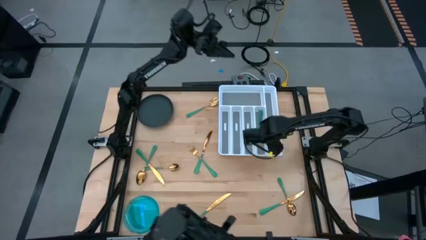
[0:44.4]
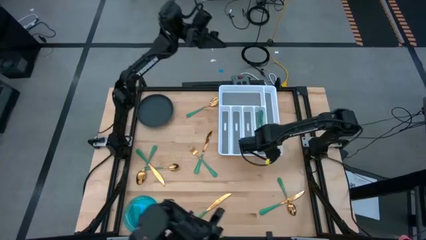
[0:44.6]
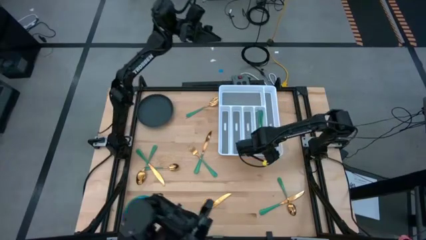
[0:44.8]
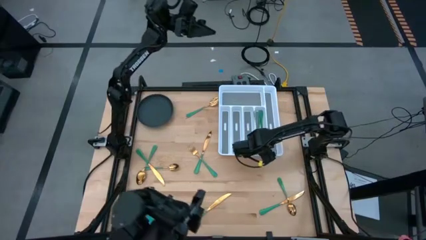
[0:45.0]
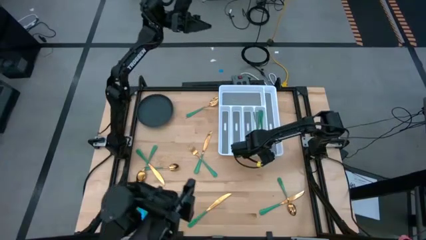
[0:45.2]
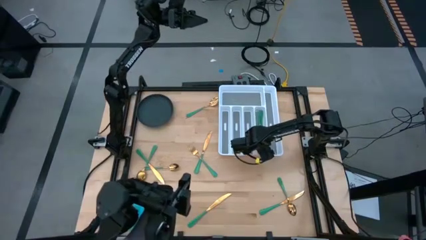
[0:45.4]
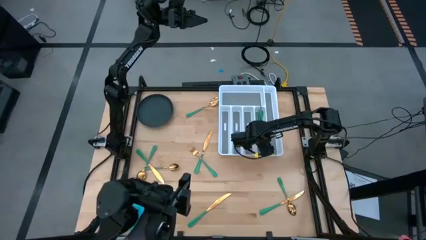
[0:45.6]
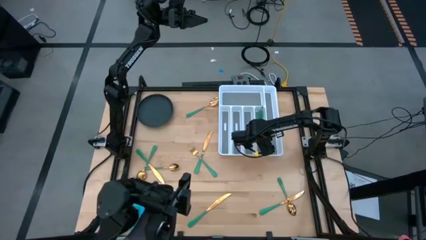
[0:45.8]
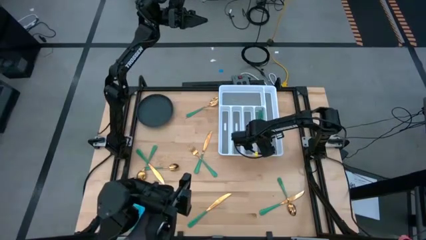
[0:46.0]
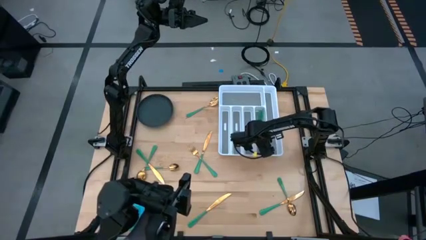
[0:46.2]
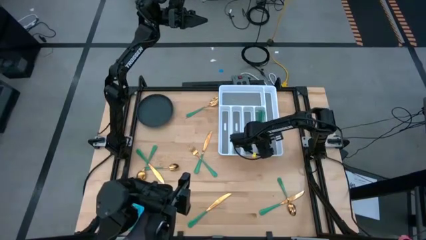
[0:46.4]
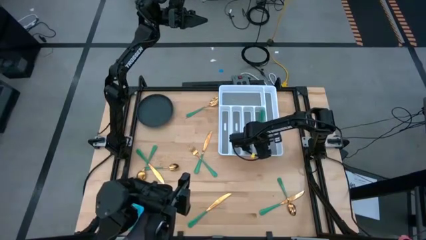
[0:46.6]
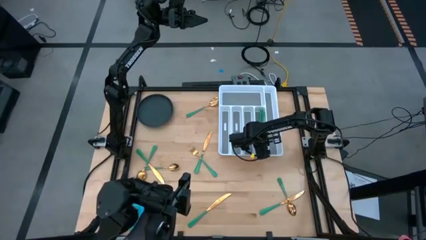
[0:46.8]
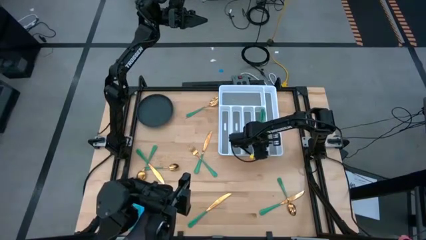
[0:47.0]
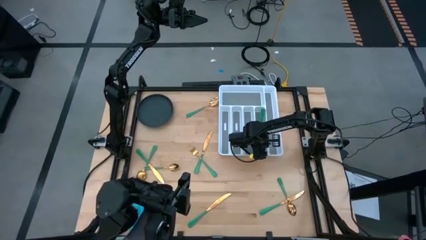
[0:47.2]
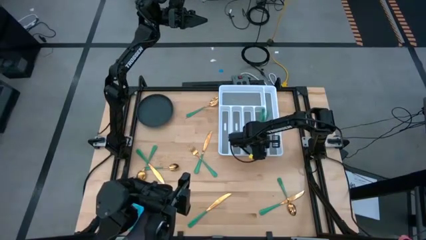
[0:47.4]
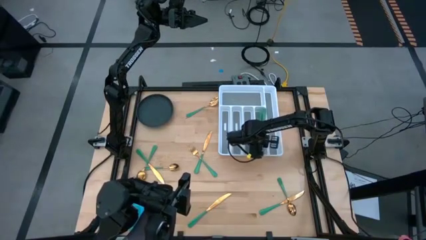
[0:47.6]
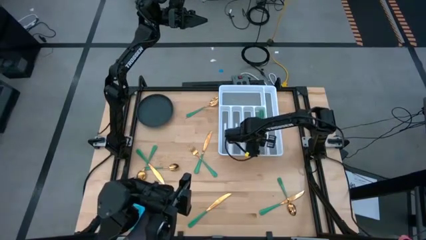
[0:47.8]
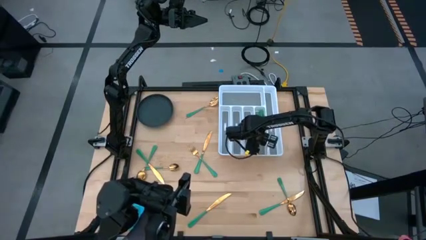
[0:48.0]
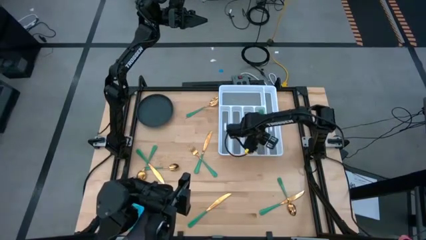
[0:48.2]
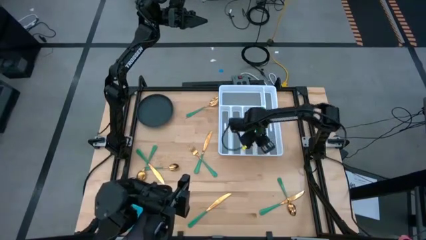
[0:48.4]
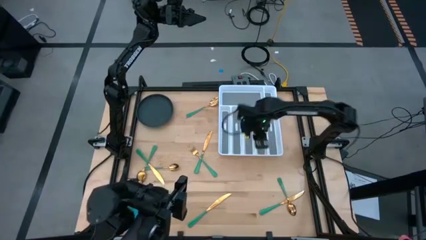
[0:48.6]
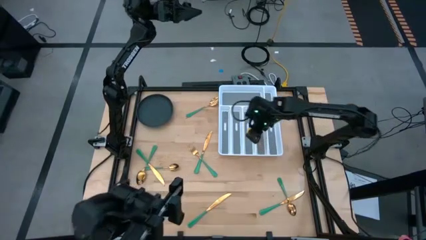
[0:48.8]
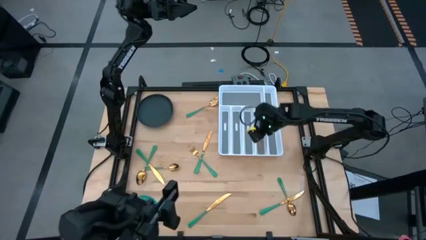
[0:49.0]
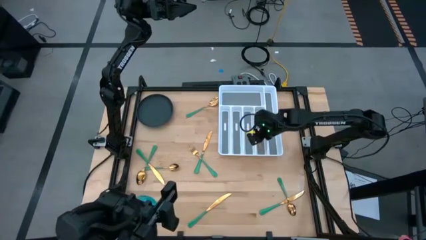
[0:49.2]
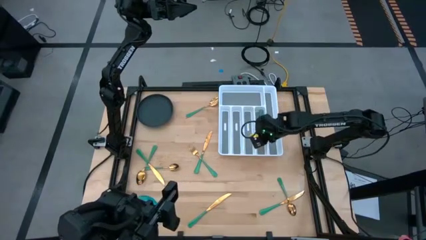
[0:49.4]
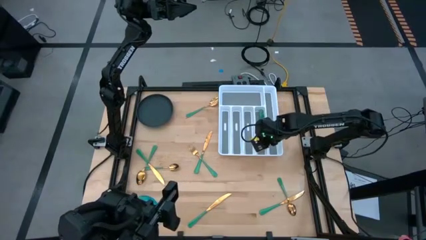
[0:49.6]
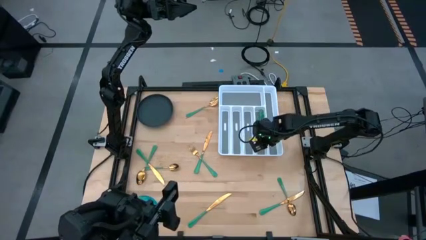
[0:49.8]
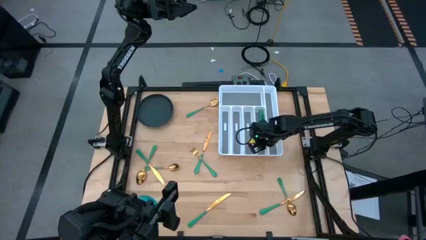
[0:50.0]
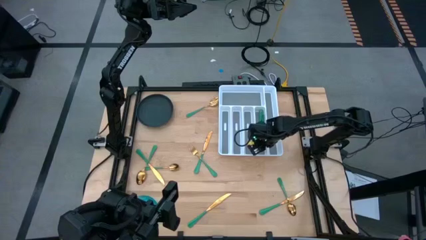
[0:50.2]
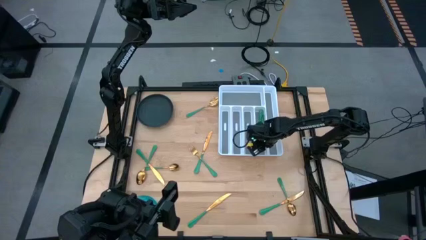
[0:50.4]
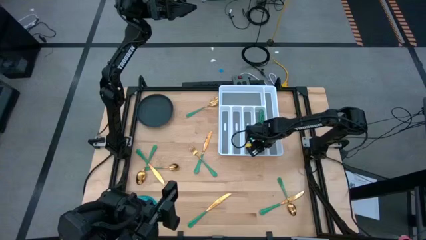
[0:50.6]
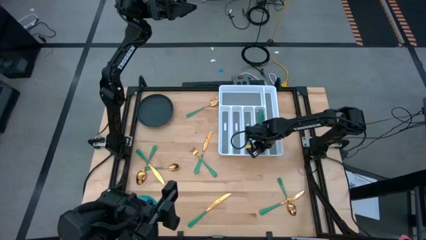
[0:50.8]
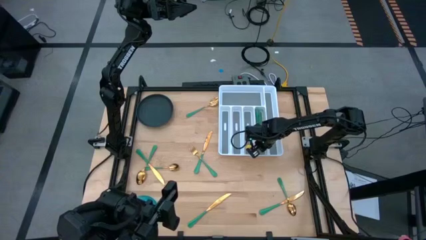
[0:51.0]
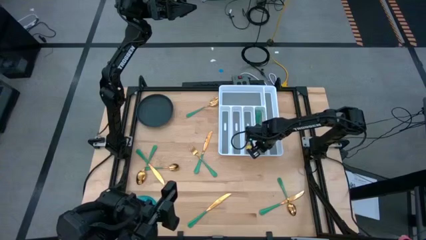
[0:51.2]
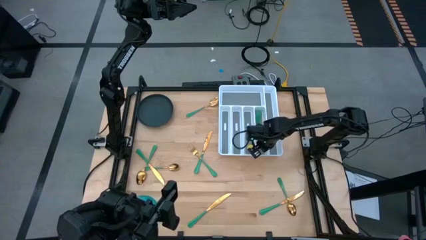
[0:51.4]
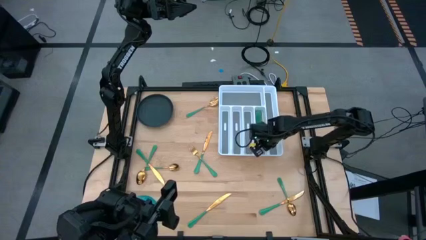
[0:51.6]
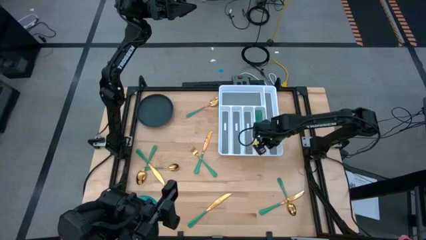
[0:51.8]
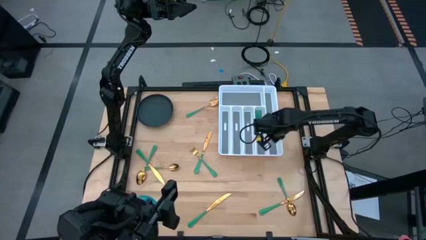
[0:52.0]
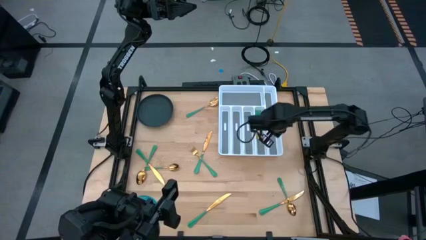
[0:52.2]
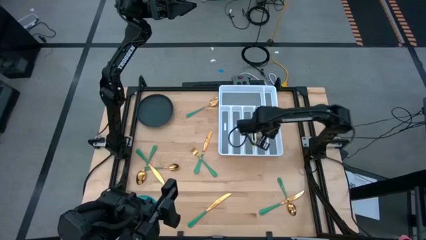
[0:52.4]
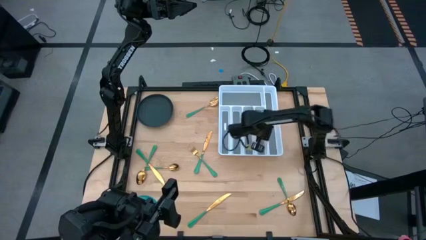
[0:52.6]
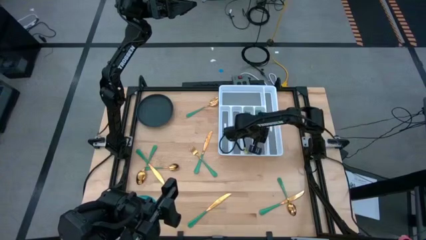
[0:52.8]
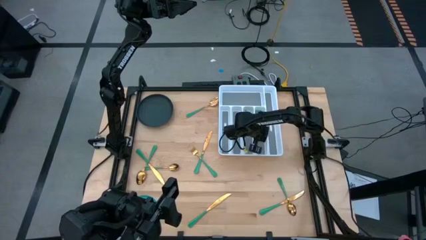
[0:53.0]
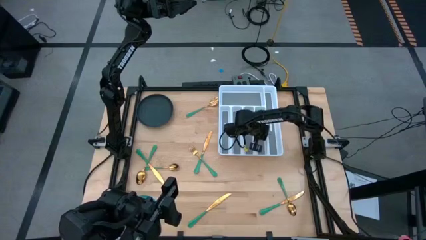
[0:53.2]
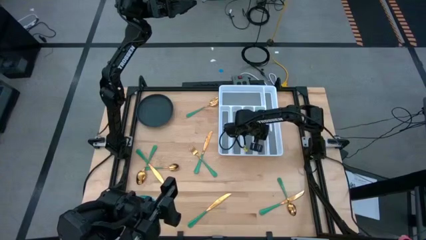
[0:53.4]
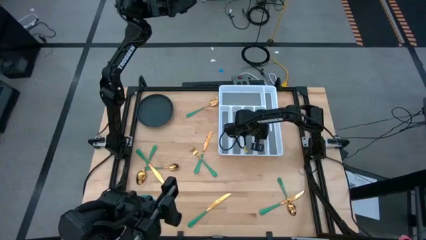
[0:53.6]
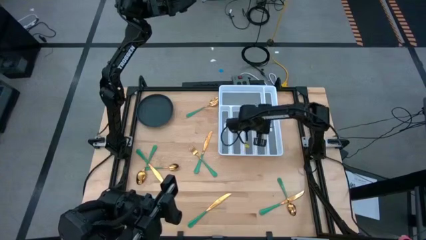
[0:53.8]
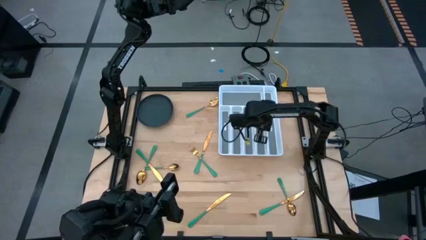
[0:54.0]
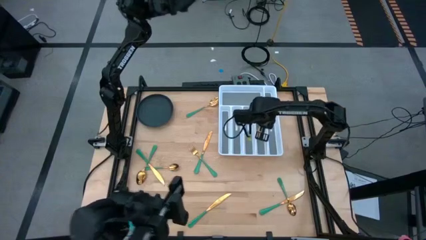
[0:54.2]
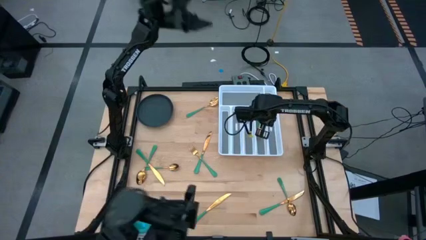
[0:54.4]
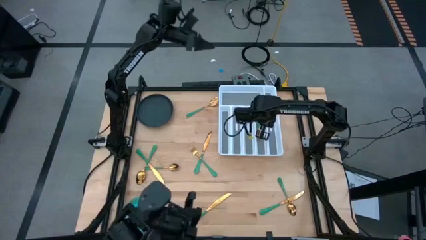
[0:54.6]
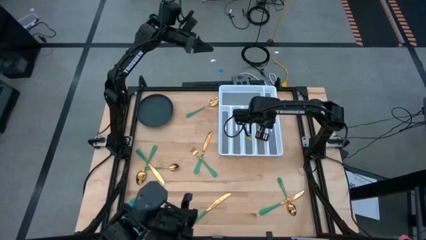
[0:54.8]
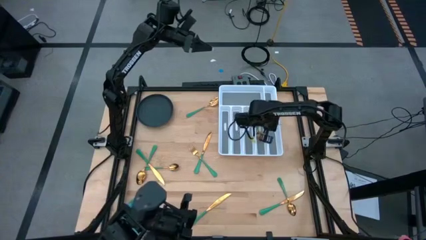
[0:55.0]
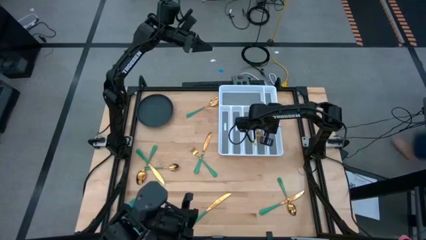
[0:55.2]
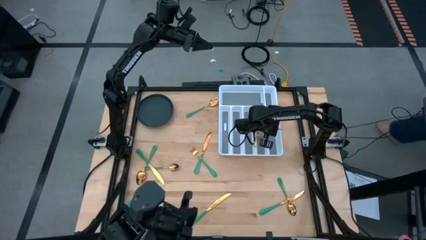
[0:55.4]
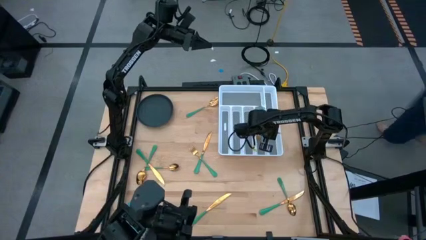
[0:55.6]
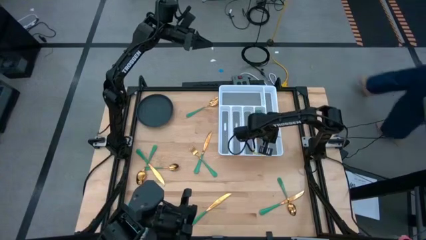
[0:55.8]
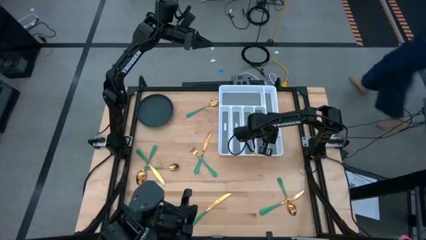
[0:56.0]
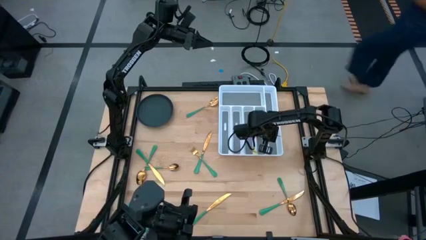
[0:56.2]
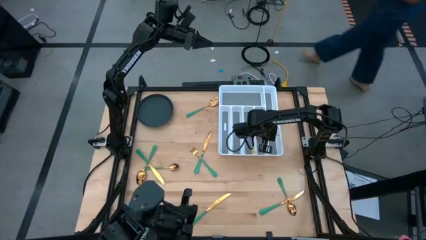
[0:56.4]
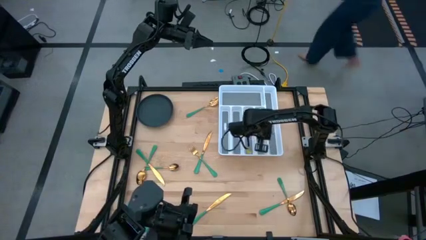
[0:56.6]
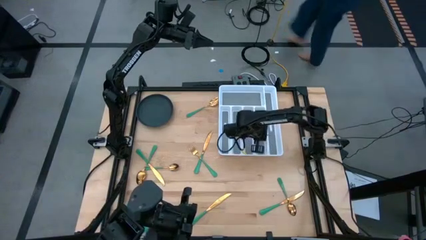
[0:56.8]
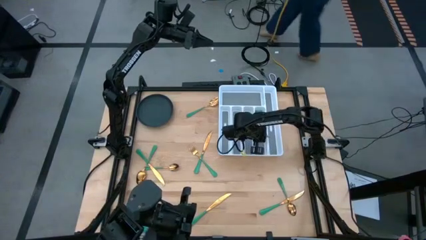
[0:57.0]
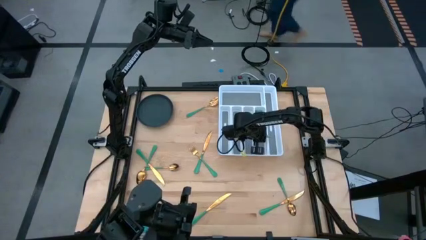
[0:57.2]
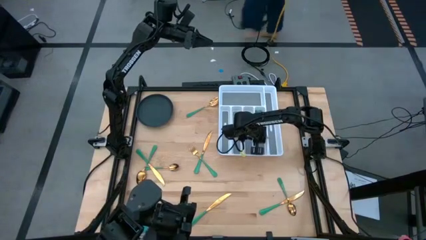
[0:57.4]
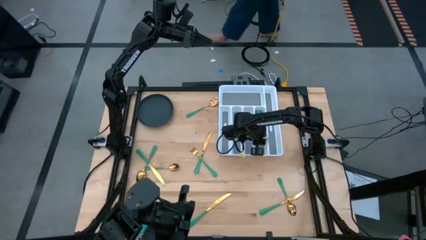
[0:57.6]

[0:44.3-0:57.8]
Task: Sort silverware
Put the top green fork into the silverware tray
